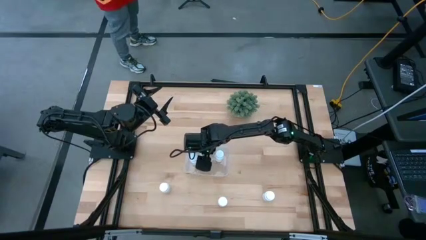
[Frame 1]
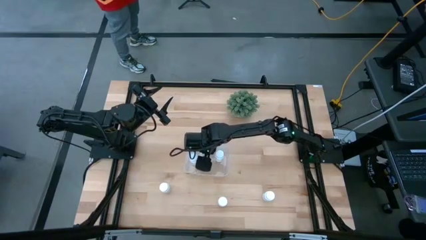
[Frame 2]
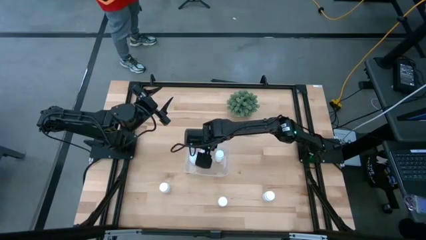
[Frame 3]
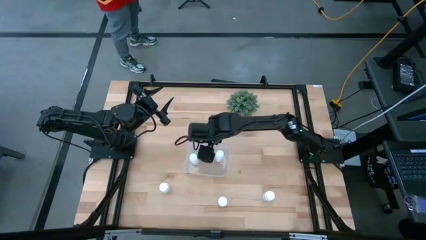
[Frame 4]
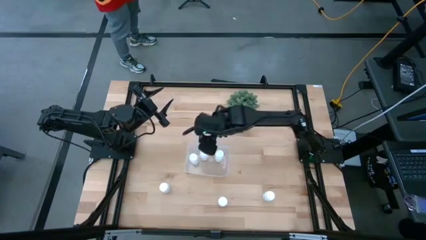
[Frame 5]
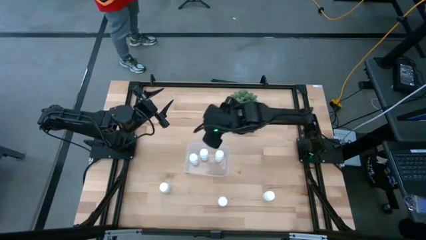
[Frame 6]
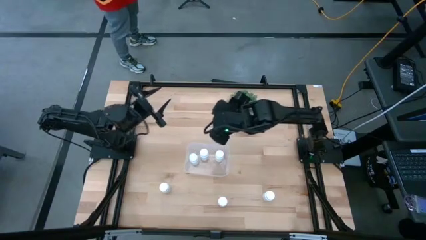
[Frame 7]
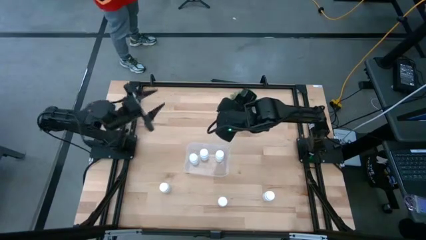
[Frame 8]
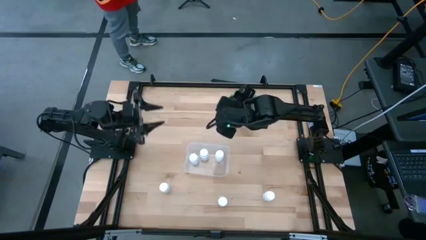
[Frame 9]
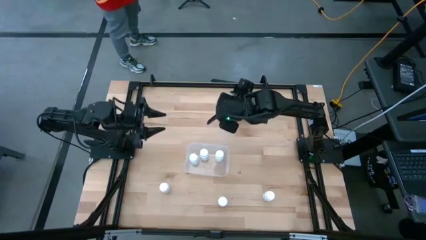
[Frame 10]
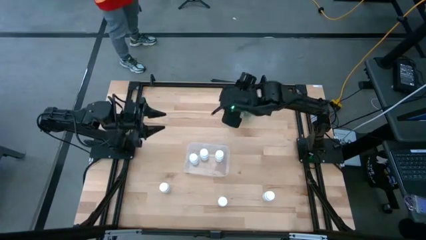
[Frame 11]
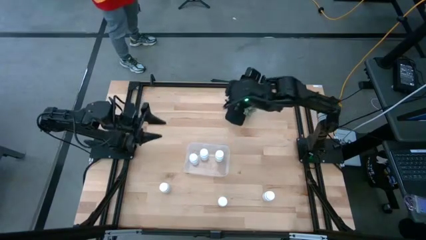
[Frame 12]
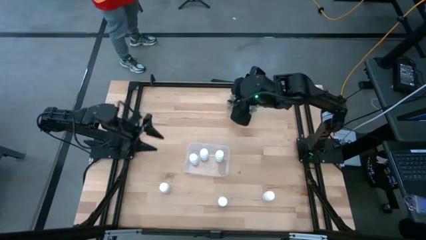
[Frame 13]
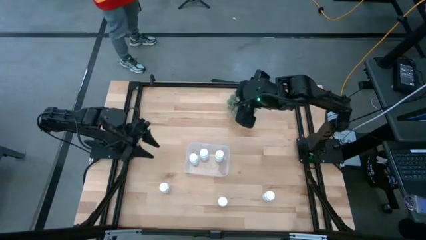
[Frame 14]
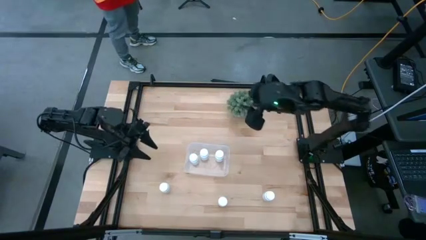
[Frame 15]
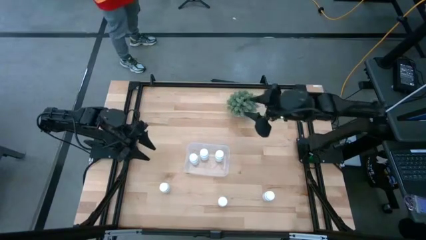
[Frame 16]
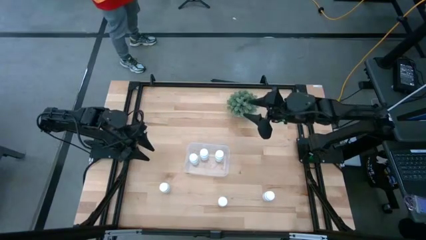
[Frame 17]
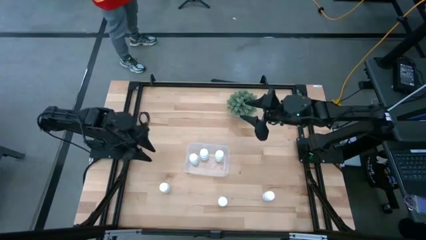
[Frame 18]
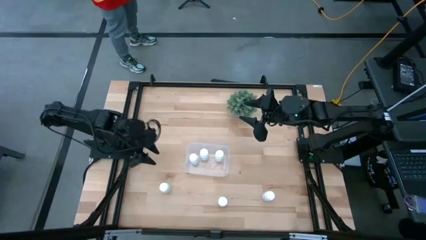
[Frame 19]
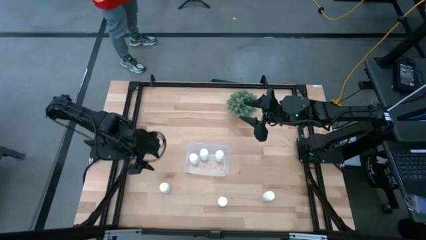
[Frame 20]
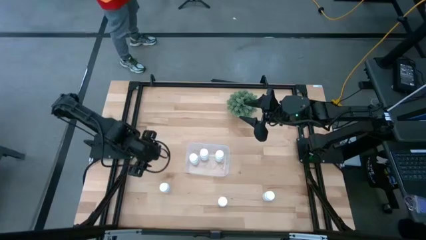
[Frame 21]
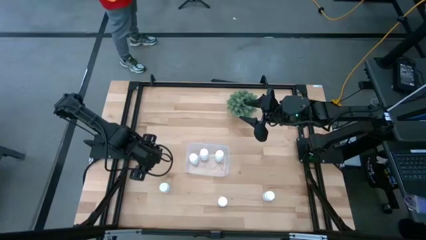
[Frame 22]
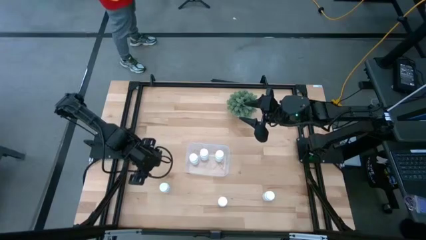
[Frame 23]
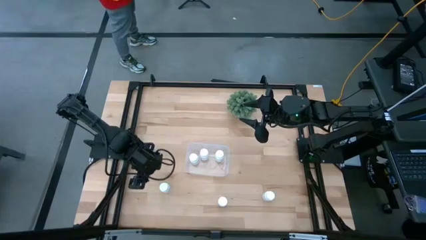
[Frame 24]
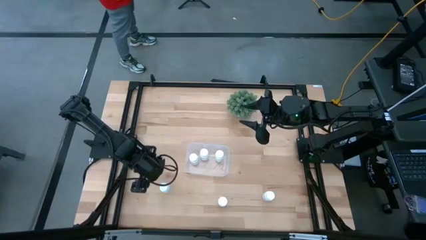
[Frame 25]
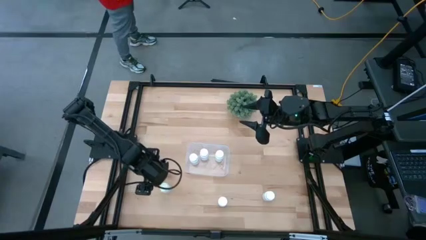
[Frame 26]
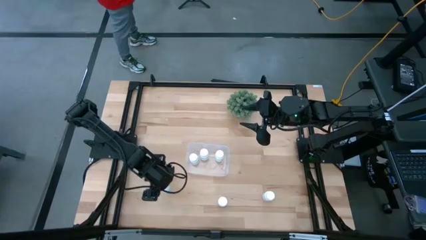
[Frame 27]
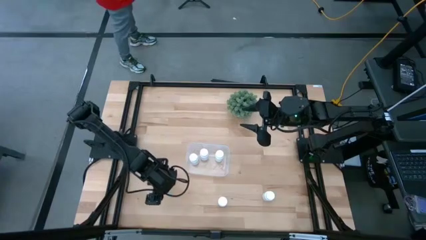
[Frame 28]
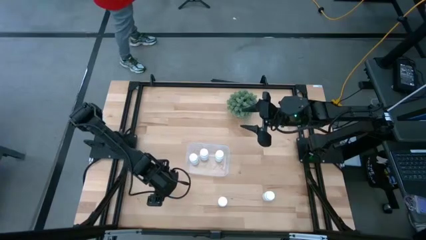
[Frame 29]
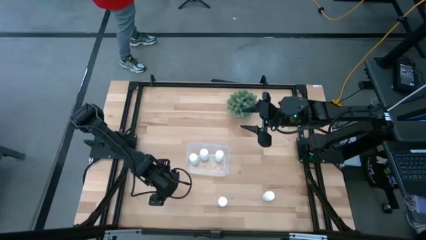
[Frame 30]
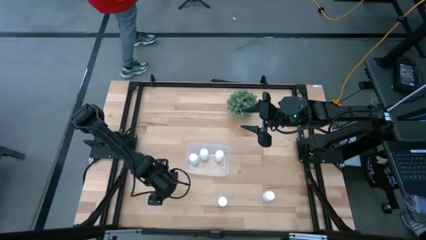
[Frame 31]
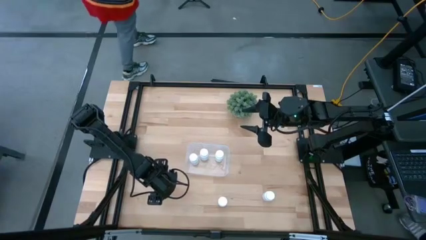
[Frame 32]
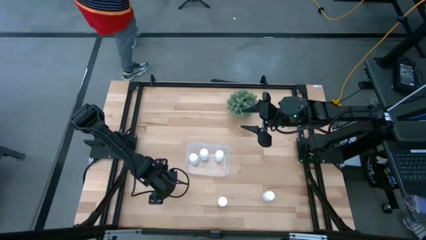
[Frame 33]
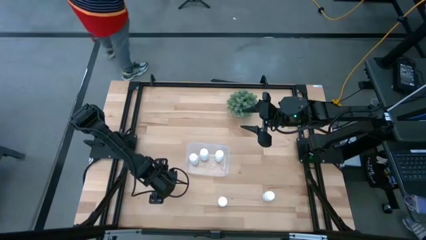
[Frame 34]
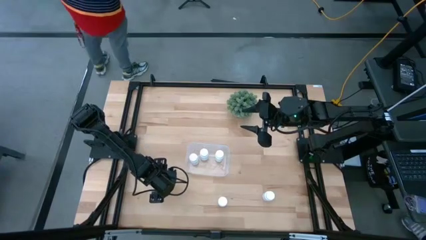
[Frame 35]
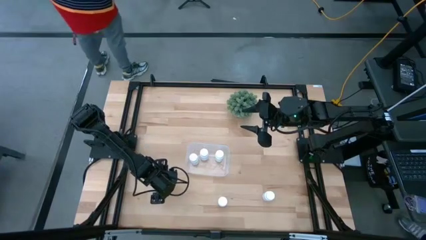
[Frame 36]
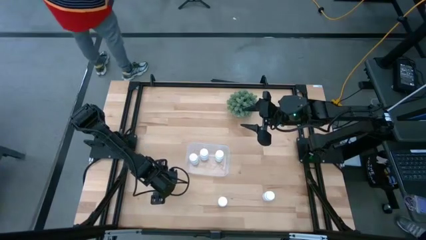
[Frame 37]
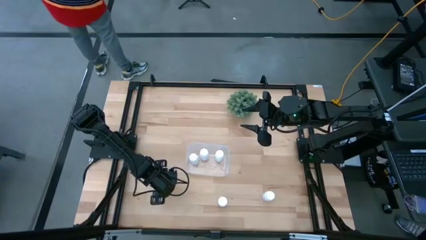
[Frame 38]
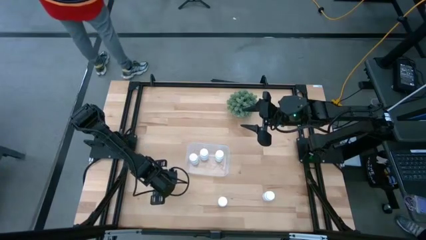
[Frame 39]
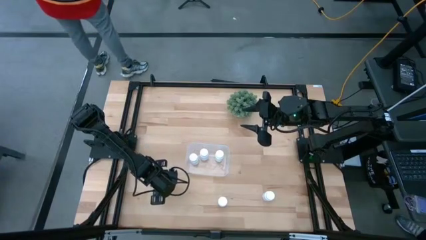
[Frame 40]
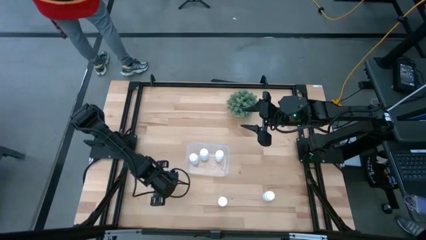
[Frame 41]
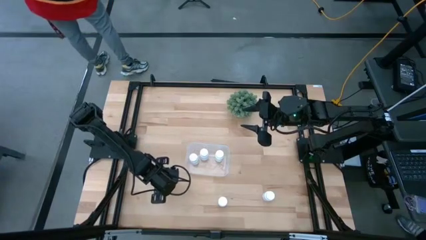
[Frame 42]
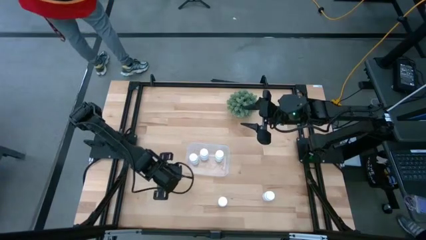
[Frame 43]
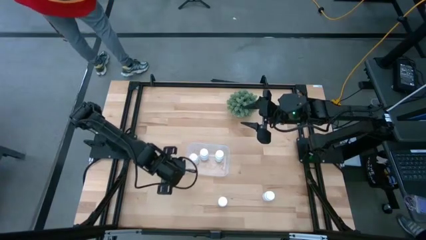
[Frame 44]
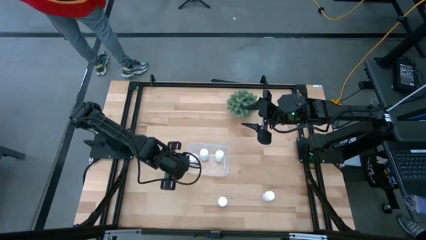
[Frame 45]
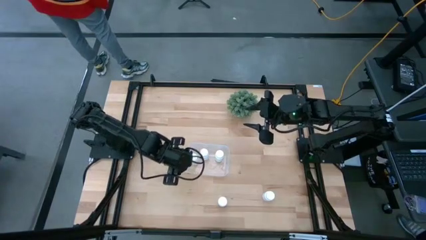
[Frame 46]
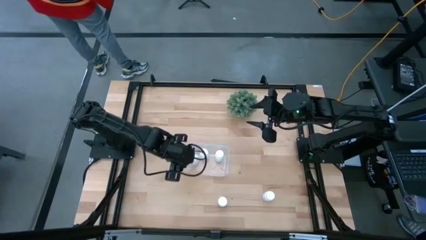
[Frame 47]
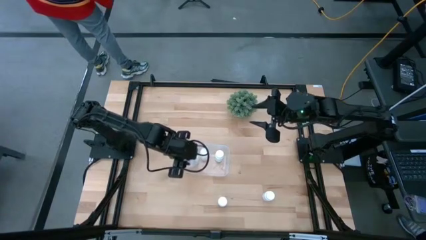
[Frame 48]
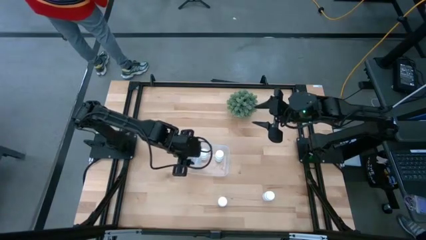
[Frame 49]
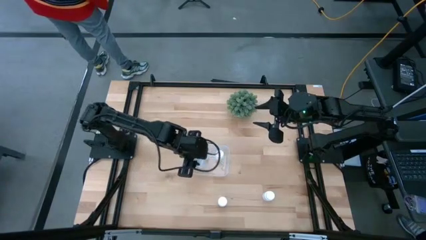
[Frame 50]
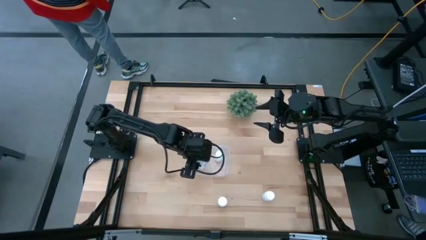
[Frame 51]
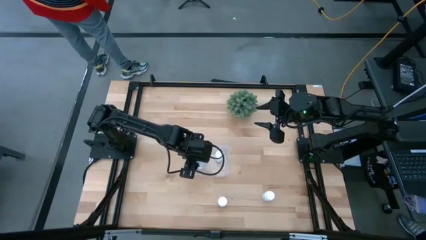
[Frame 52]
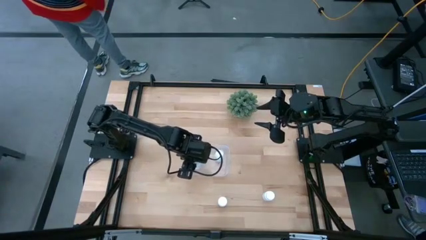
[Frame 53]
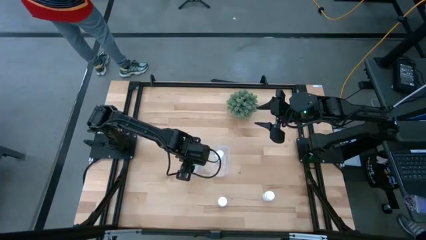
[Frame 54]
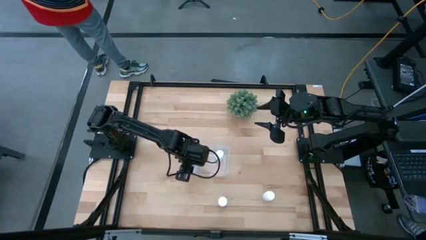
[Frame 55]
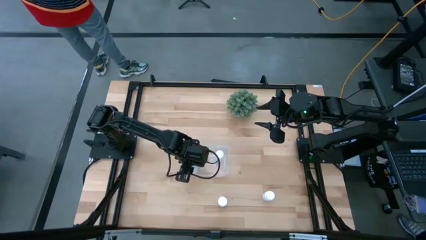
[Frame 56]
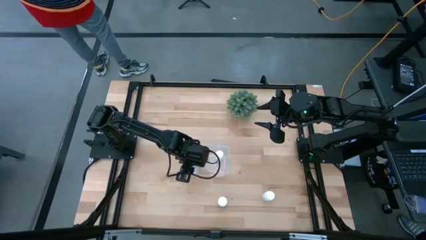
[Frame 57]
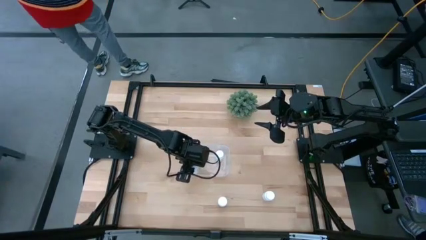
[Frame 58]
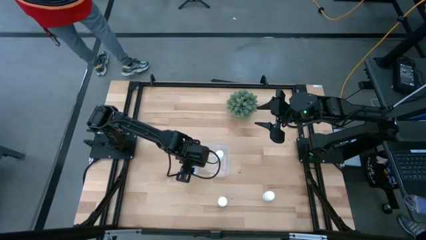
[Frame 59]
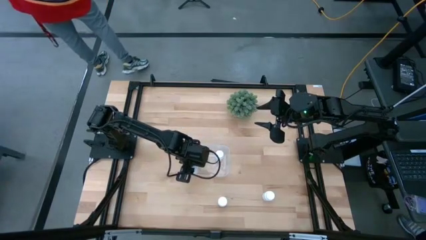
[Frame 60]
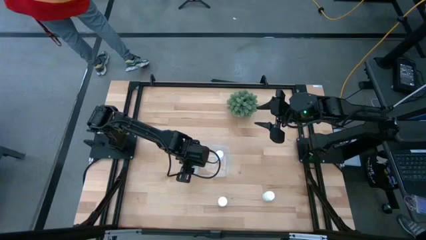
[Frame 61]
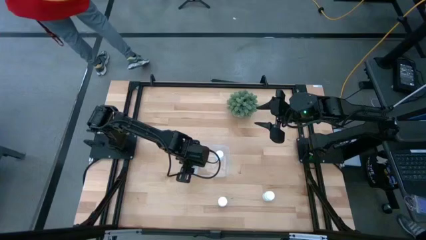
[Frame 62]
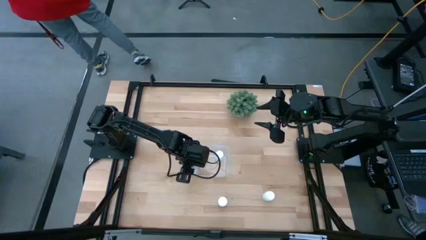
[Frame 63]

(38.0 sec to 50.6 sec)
Task: Pick and place pill bottles into a basket
Put the white medicine bottle into the transparent bin

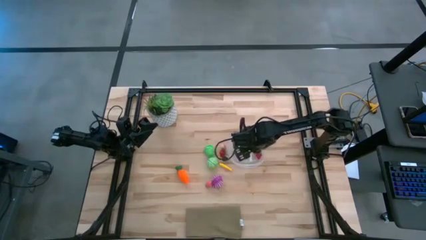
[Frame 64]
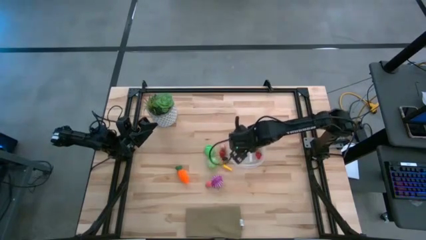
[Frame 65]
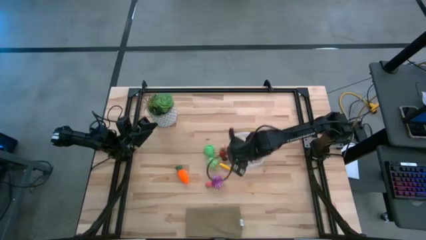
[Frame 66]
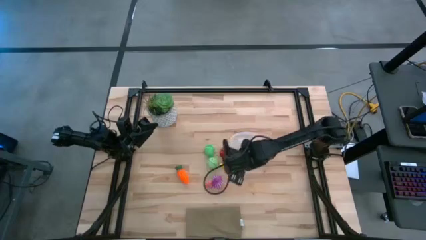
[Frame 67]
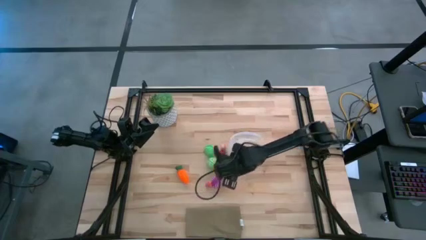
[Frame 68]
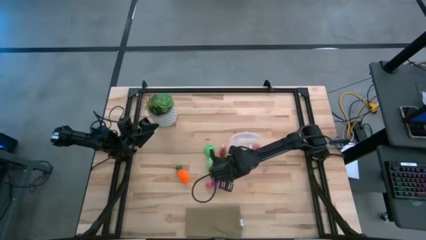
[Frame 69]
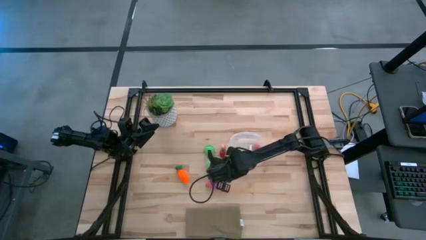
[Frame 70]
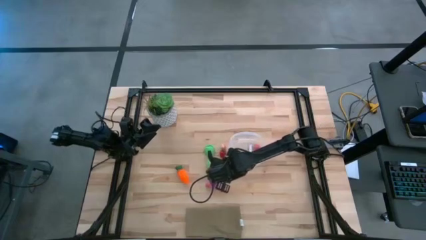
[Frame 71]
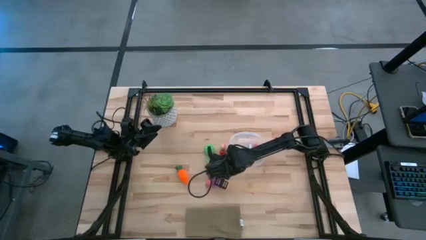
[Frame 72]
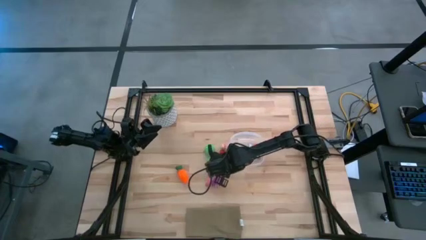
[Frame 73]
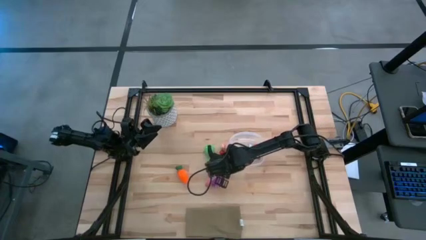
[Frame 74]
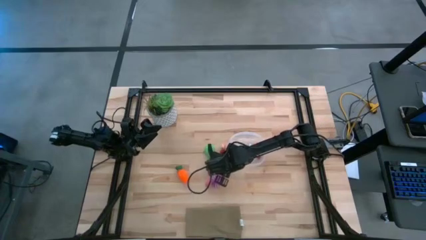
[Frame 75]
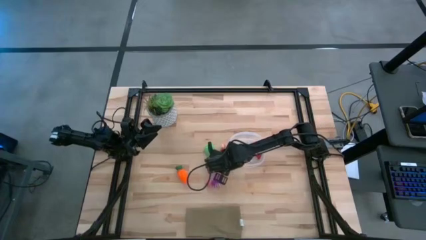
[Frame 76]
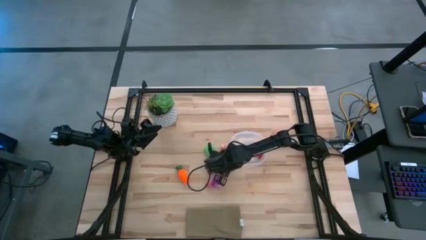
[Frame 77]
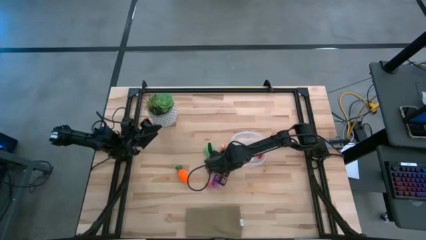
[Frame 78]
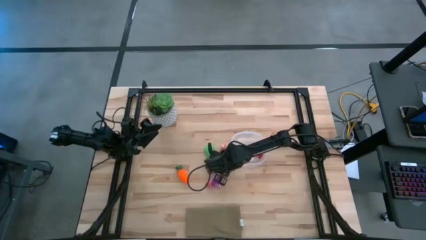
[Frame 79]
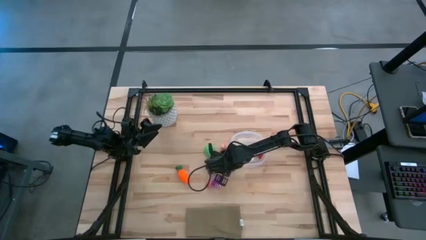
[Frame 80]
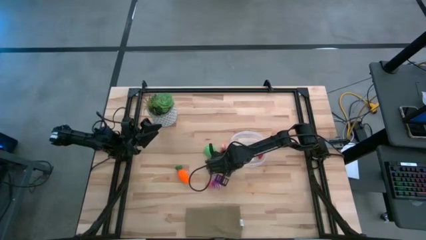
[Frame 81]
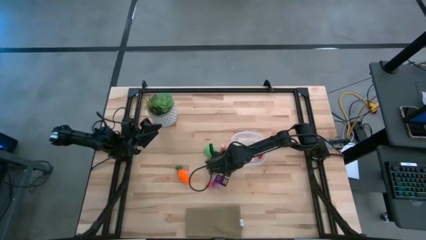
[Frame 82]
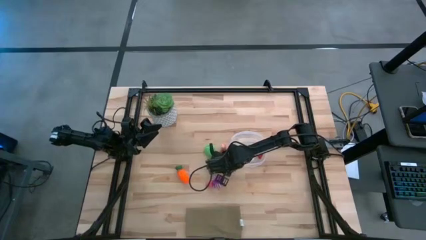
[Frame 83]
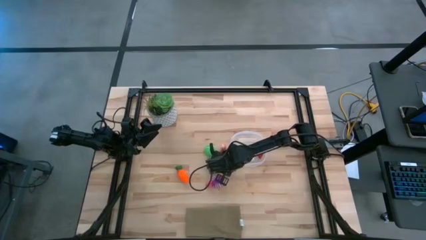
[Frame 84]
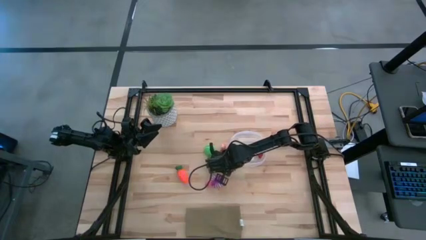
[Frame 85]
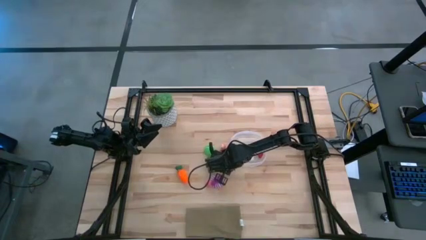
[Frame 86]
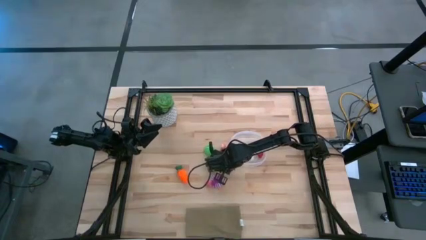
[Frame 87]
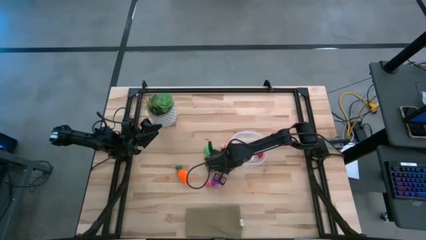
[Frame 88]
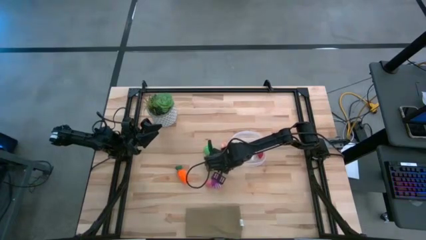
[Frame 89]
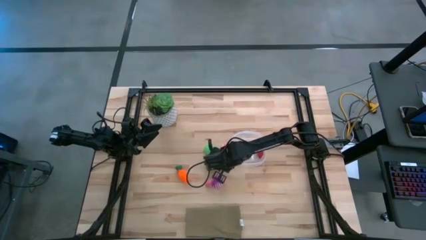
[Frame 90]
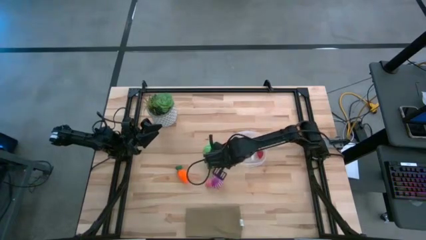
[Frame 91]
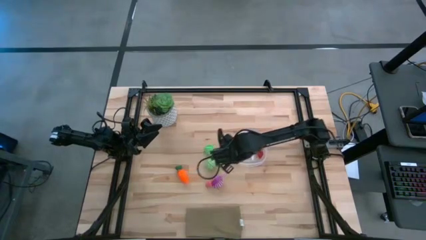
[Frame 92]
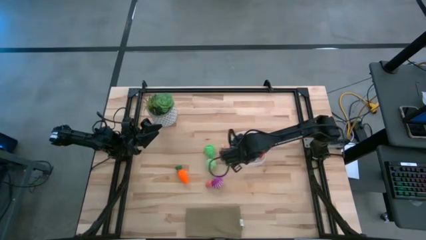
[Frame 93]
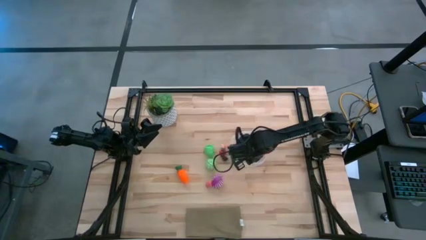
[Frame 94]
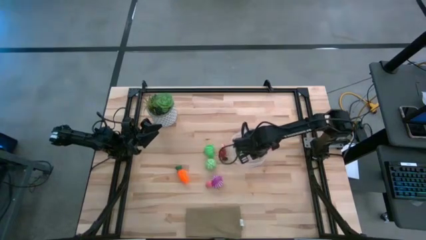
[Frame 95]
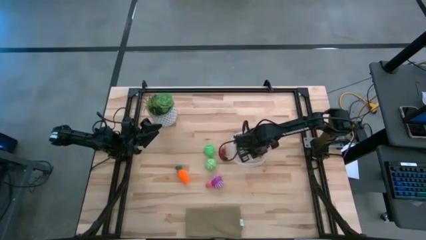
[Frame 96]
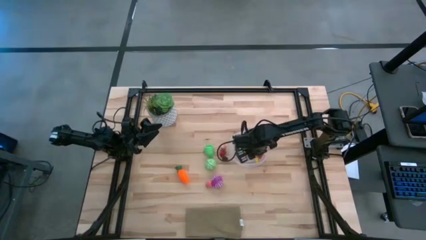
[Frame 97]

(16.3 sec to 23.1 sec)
Task: Pick and placing Produce into tupperware
Put the yellow corn into the transparent container
